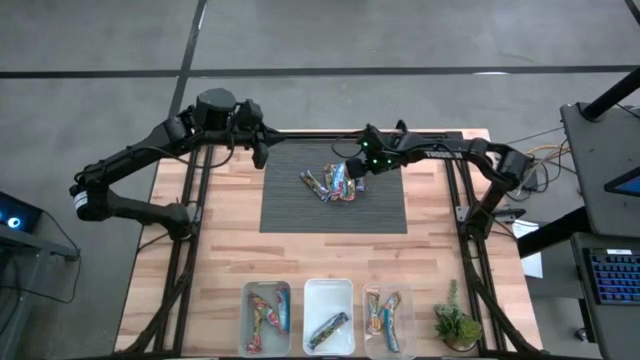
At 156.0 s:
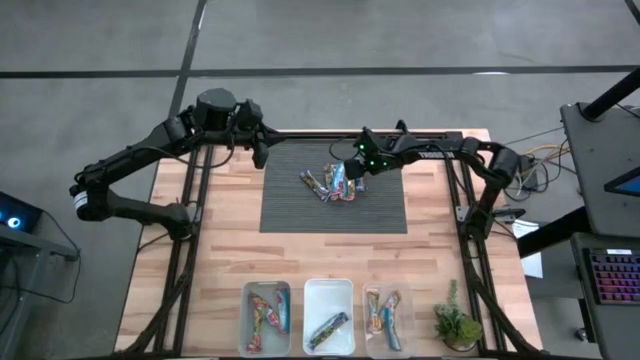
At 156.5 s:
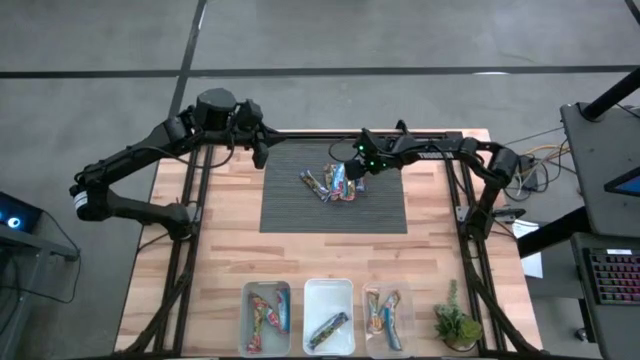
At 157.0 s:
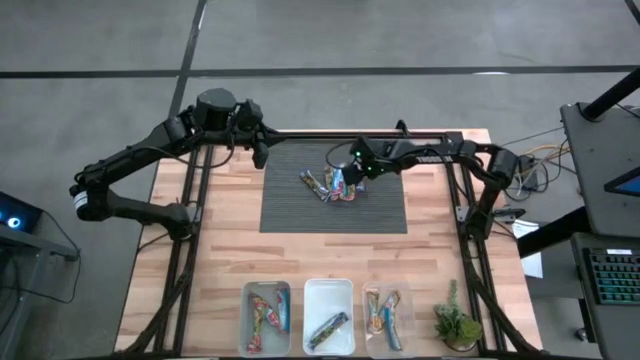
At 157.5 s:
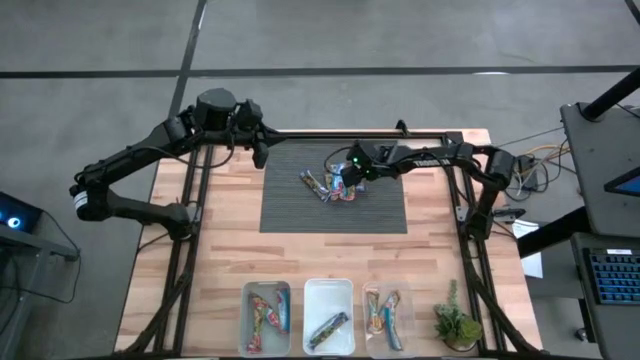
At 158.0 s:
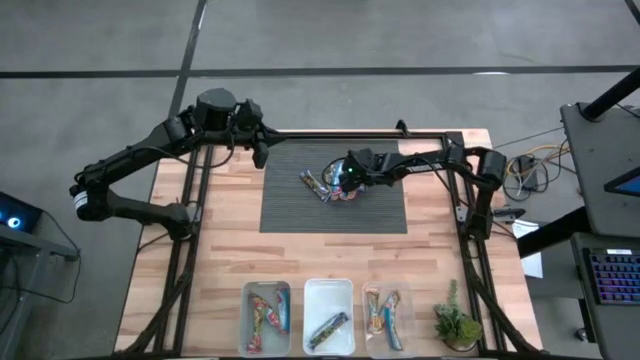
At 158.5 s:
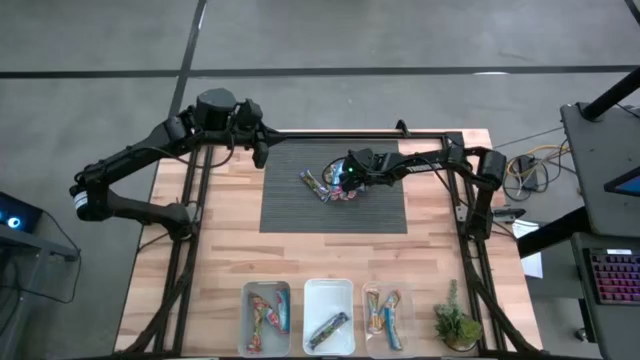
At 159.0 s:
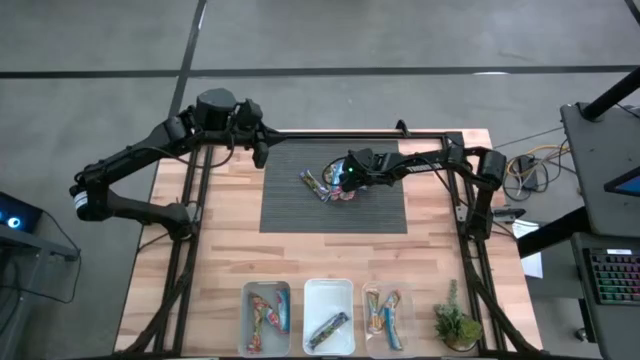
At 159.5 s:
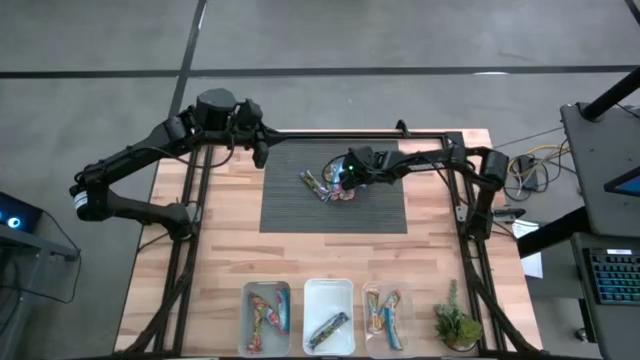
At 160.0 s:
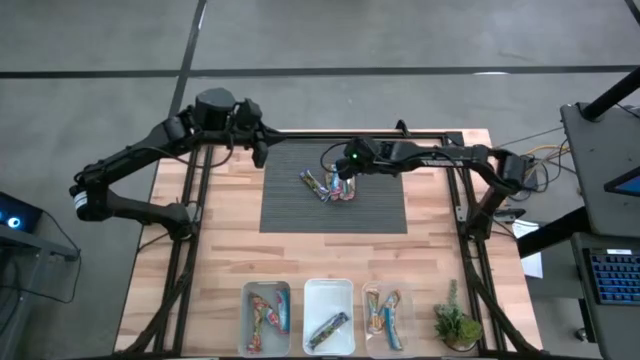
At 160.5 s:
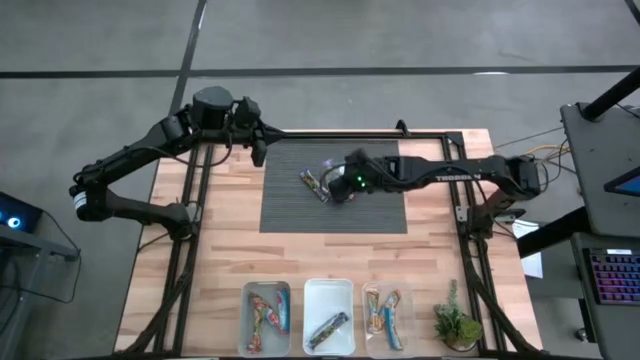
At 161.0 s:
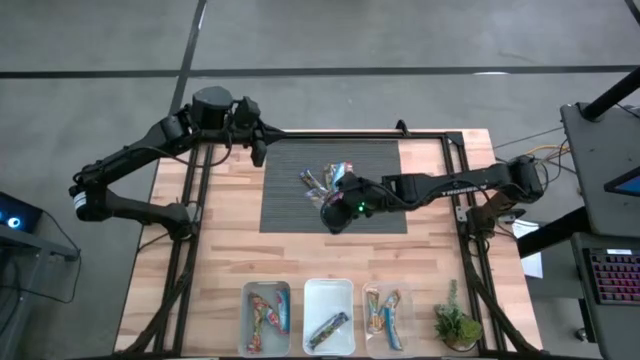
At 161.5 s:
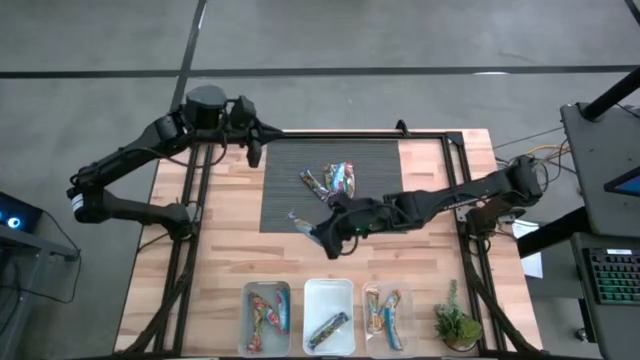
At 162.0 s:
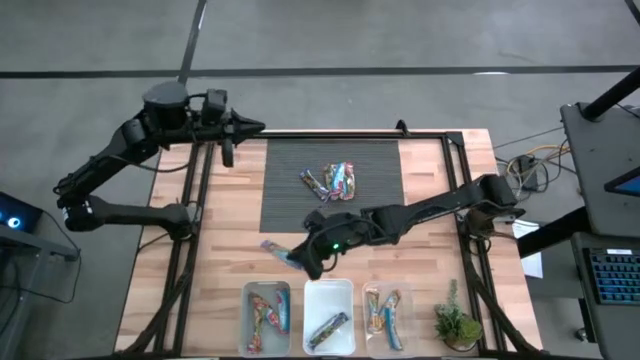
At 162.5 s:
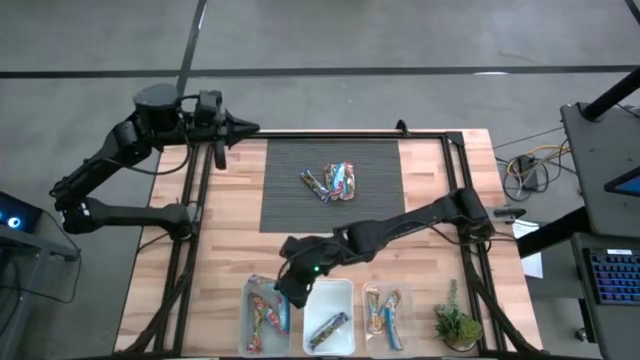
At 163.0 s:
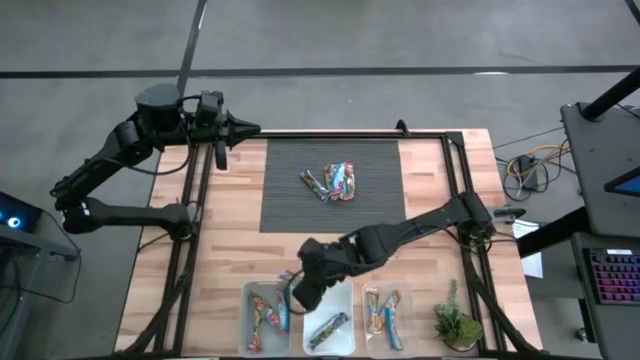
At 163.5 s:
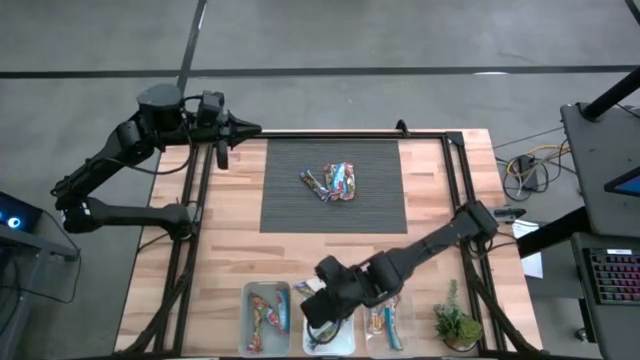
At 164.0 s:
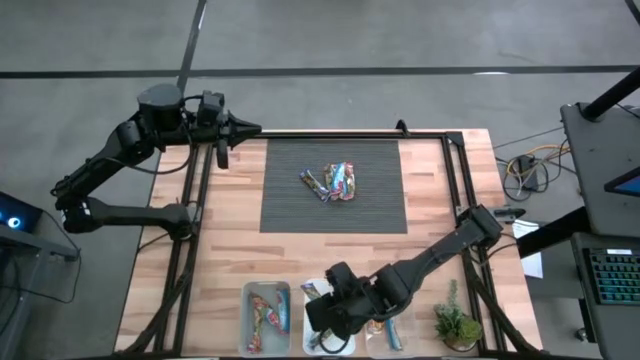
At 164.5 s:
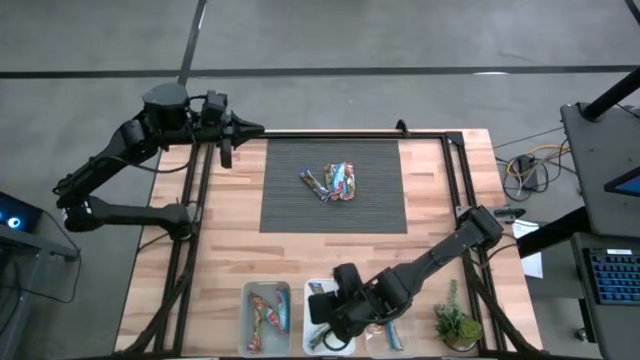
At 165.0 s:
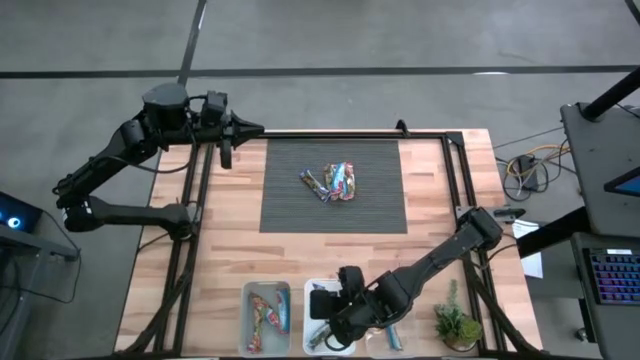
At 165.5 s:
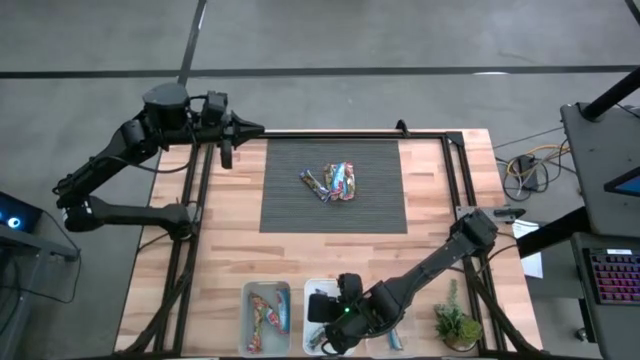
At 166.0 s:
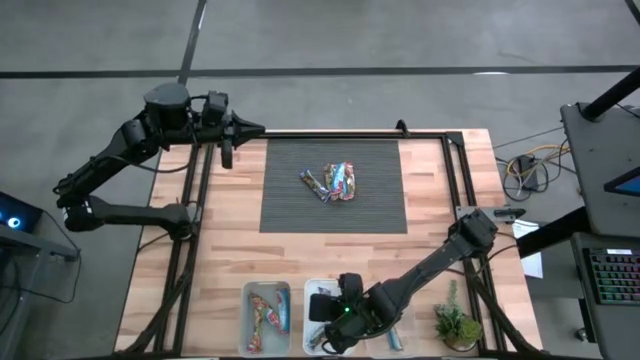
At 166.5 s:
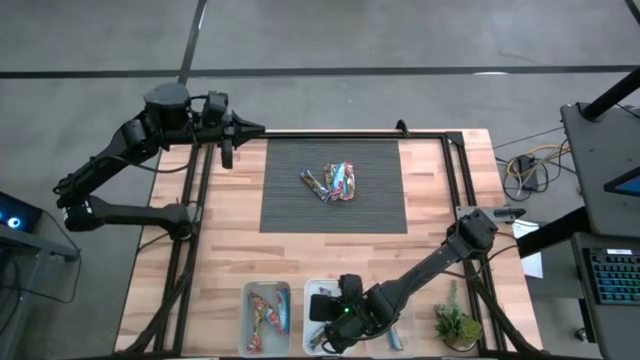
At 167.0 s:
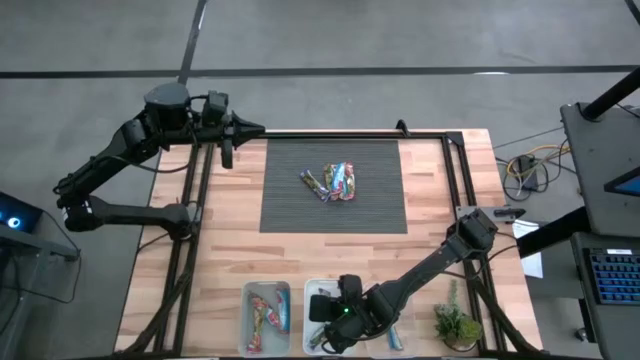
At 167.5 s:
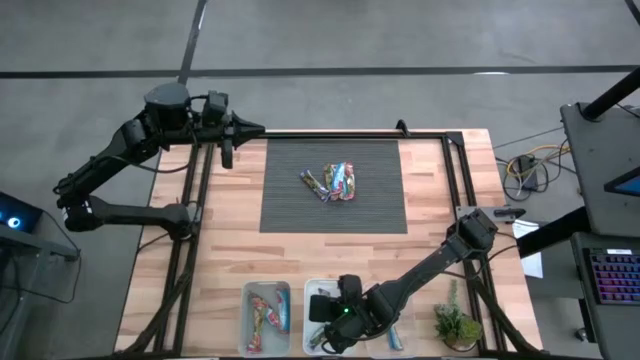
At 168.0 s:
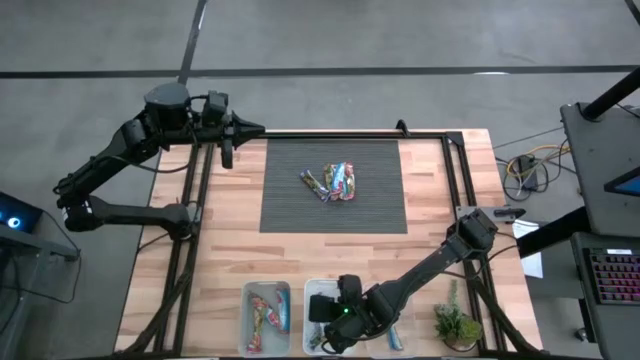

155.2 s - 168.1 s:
Task: Pick and place Granola Bars by type
Put the right blue granola bar into the white bin

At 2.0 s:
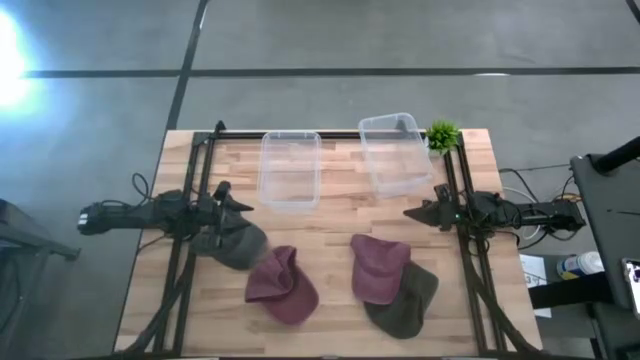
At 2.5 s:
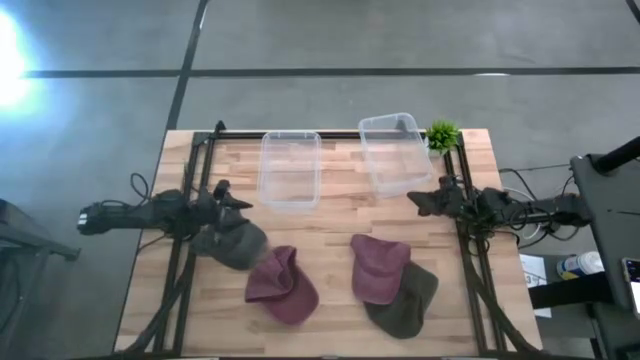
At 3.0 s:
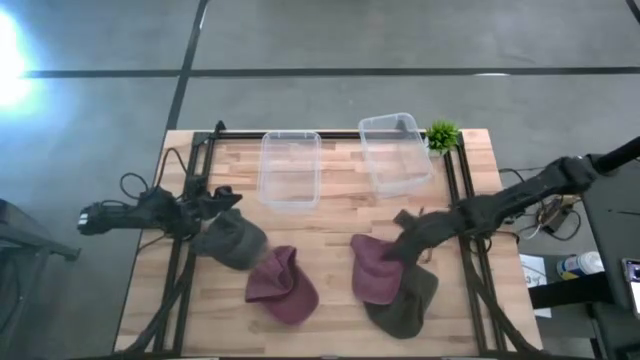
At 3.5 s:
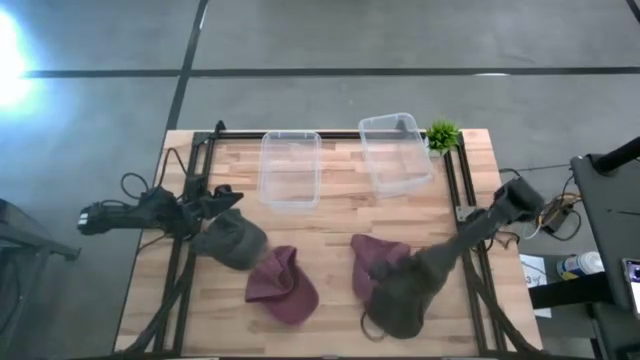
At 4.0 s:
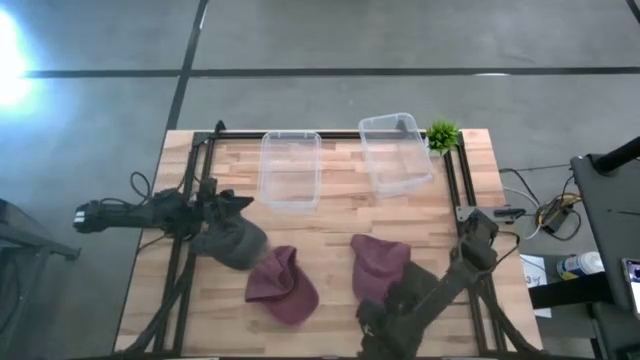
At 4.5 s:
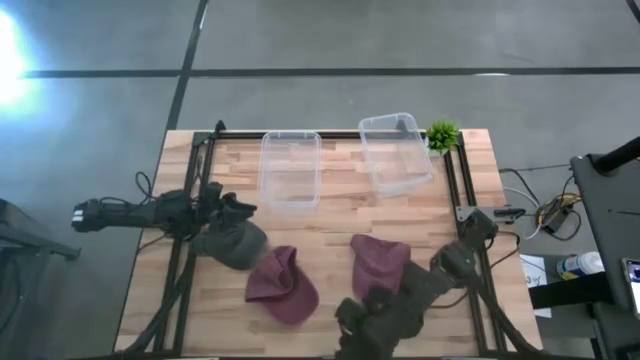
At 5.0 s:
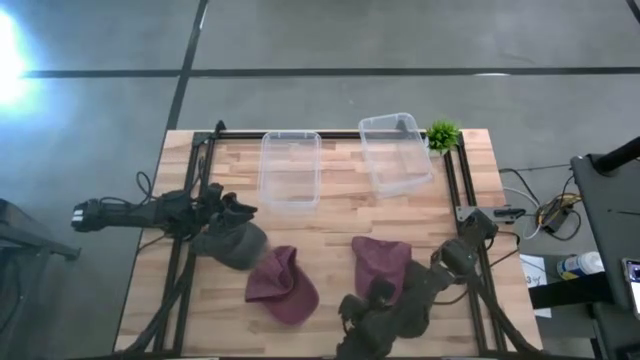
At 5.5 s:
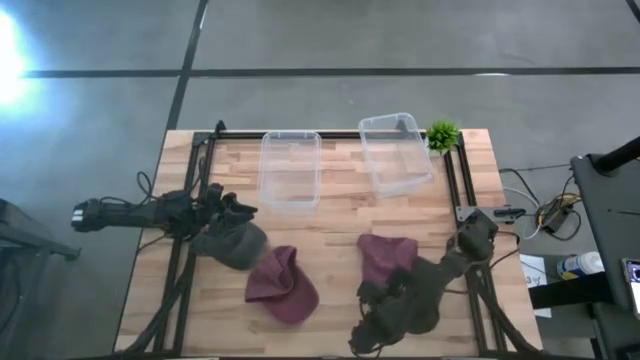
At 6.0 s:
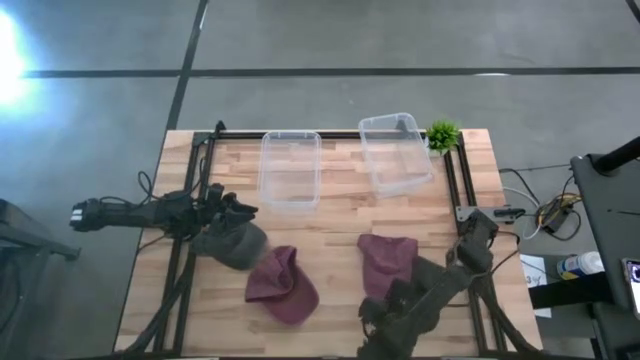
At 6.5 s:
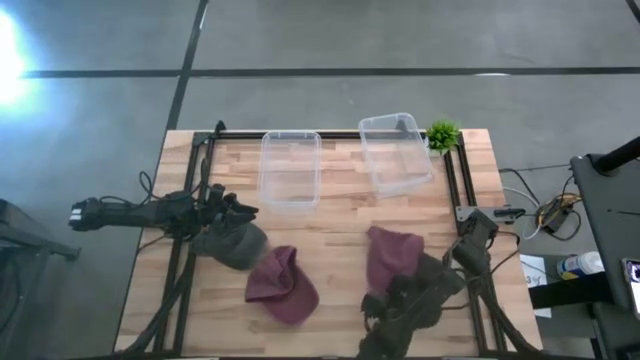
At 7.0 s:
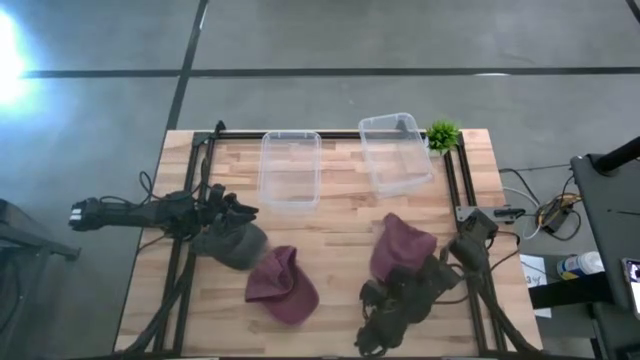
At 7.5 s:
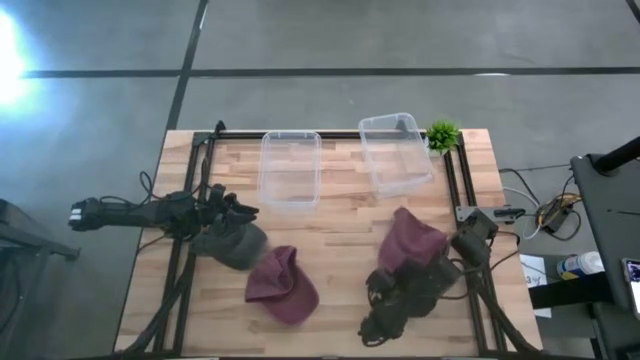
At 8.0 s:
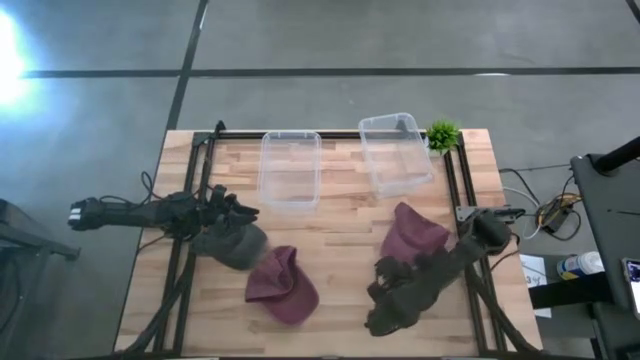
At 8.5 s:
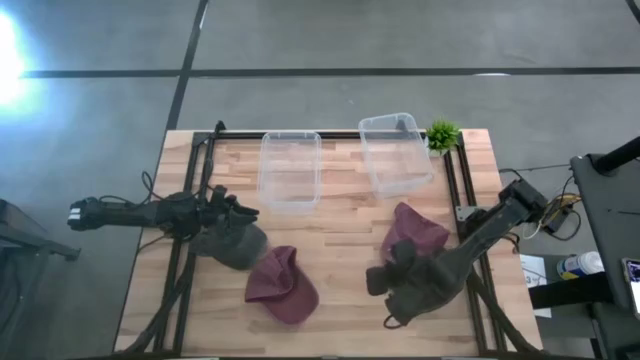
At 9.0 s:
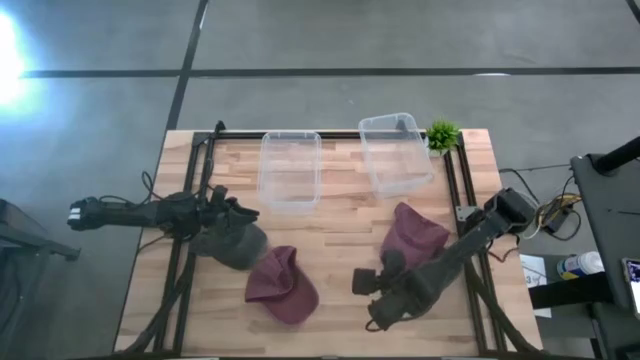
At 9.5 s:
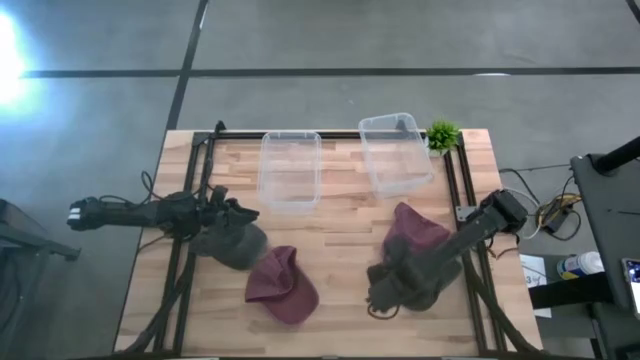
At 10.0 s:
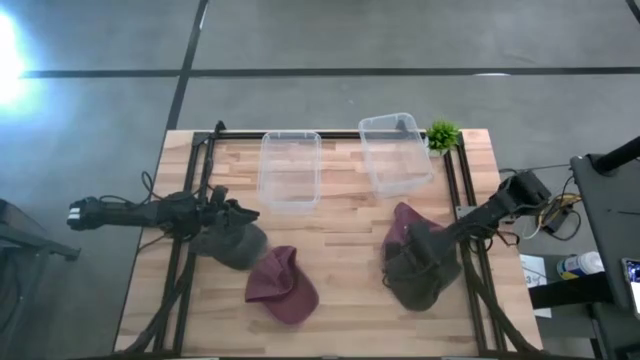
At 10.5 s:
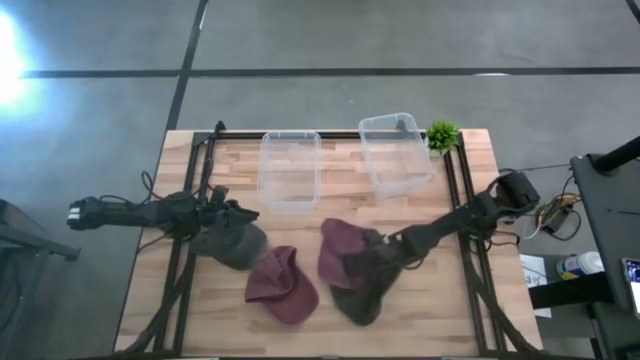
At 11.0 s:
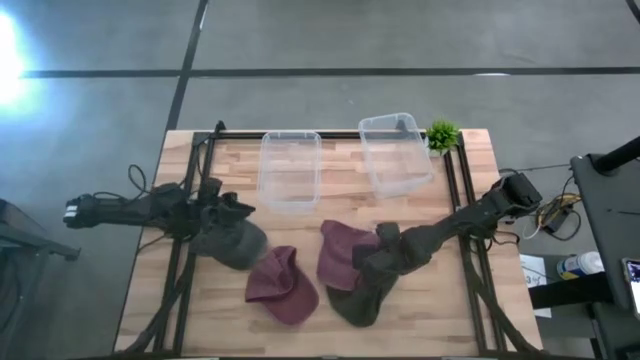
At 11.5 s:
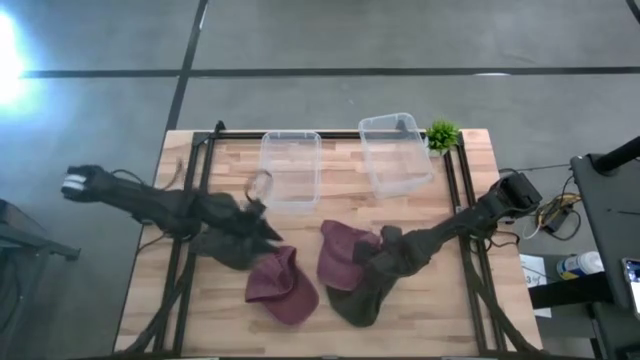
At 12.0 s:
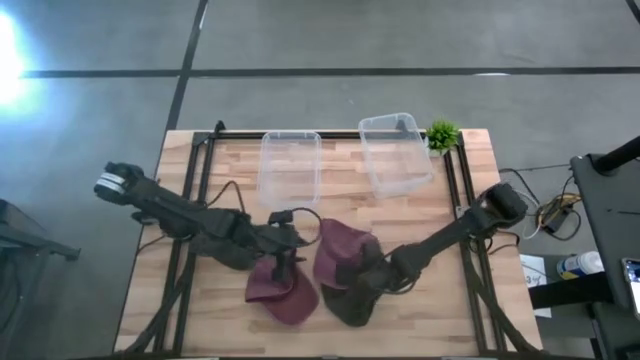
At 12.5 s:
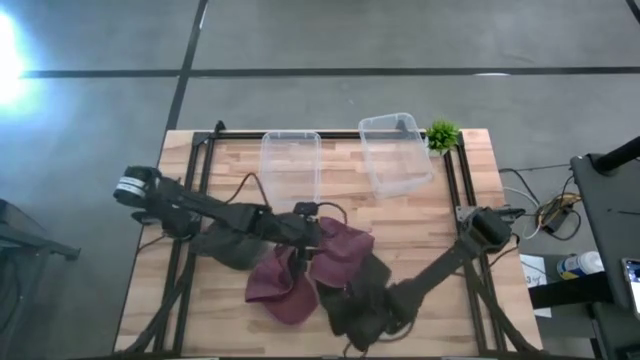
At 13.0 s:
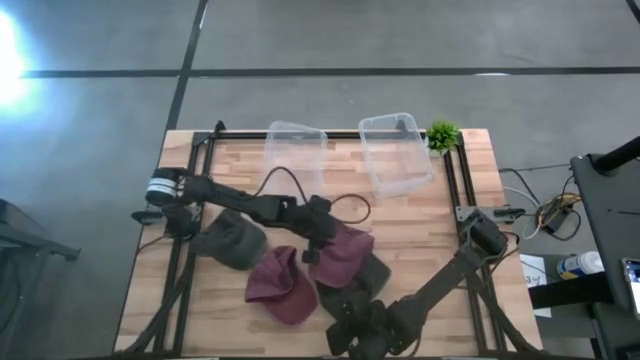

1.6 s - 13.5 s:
Task: Pick & Place hat
Put the right red cap into the left transparent bin
